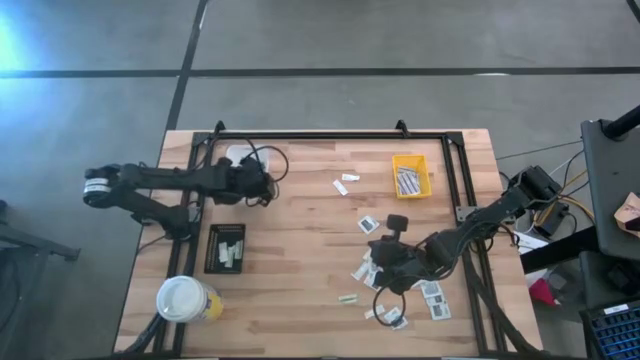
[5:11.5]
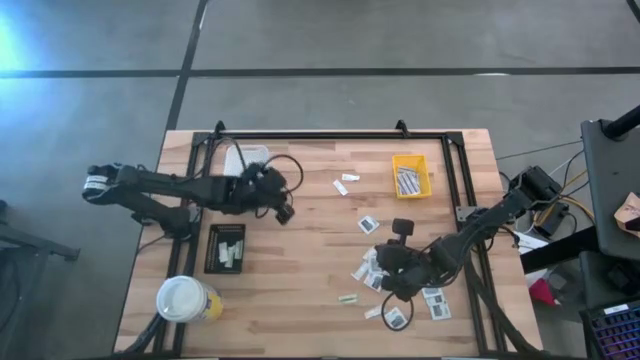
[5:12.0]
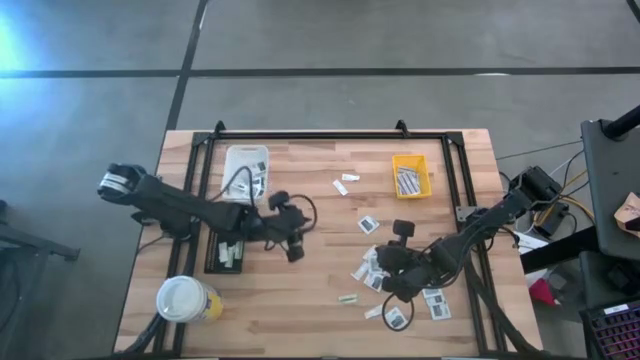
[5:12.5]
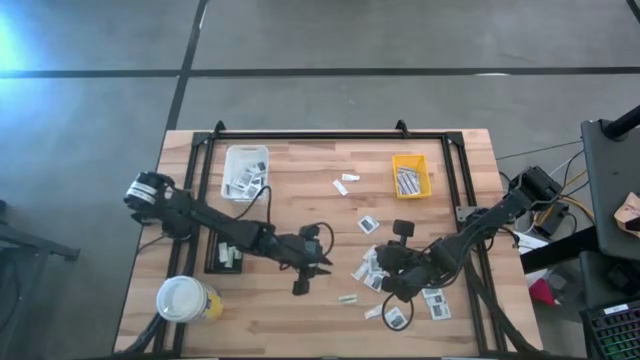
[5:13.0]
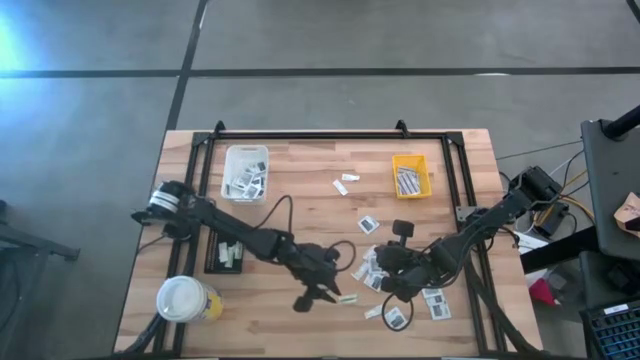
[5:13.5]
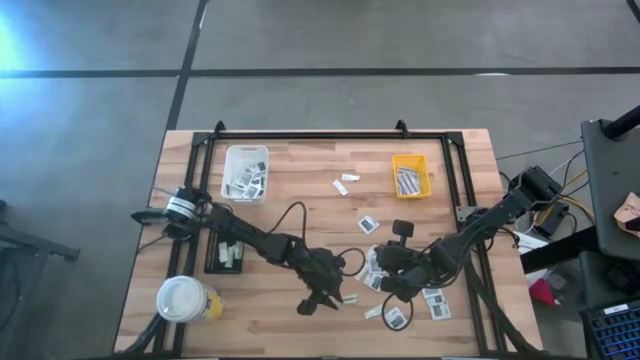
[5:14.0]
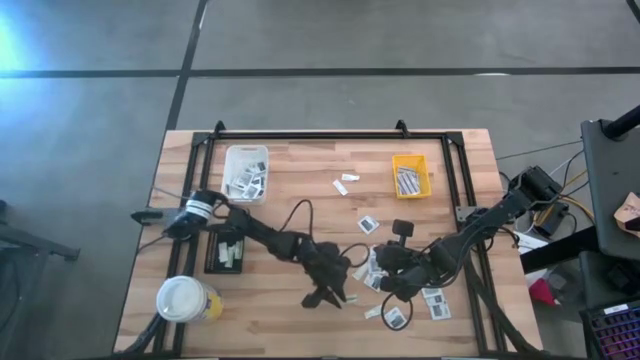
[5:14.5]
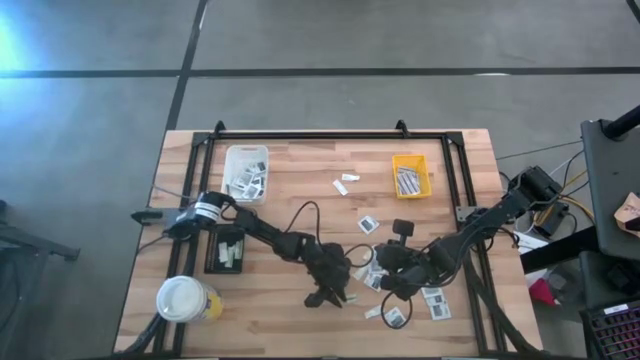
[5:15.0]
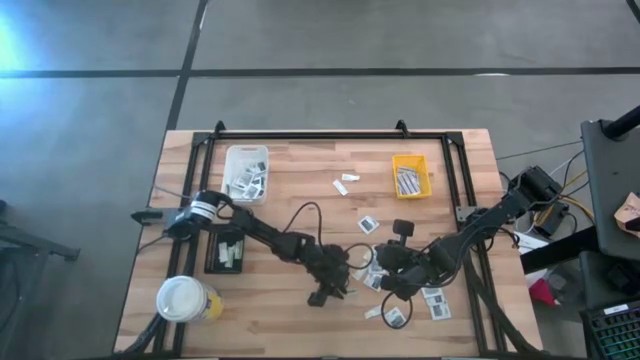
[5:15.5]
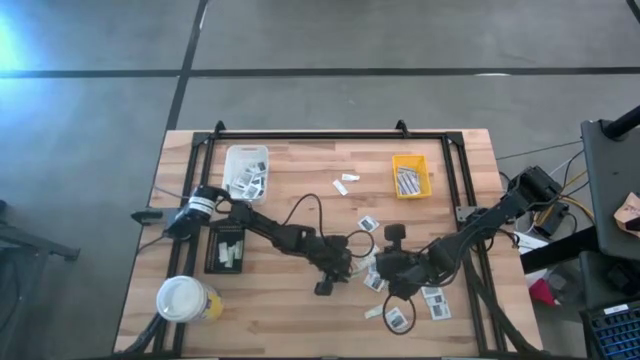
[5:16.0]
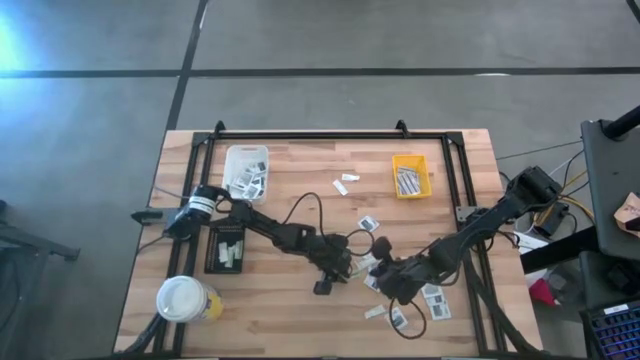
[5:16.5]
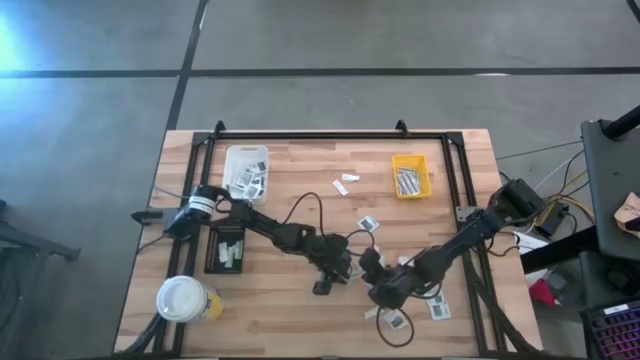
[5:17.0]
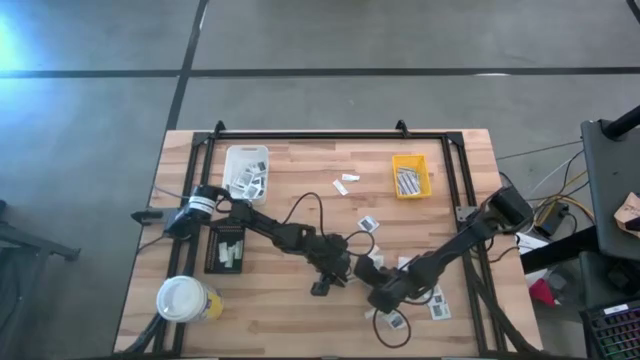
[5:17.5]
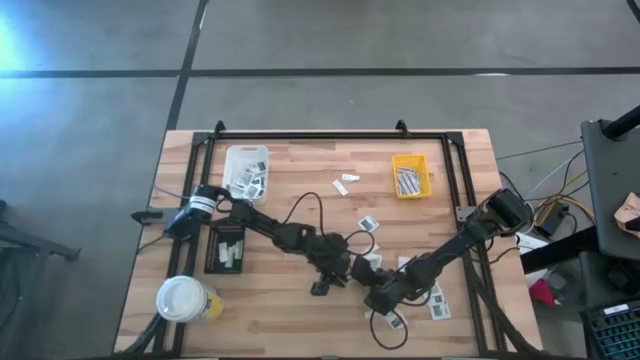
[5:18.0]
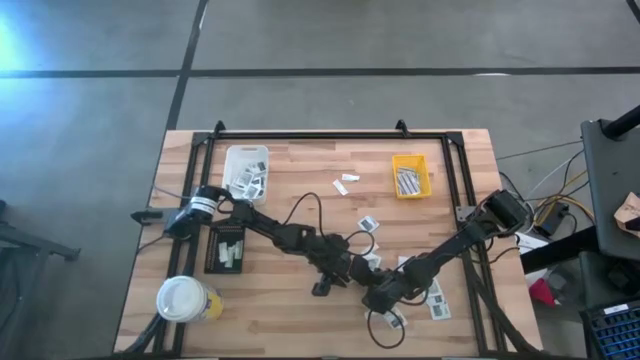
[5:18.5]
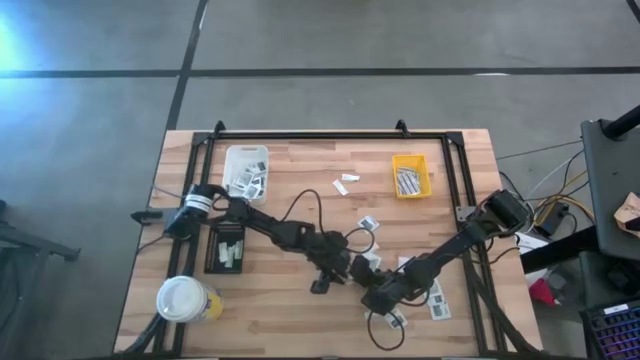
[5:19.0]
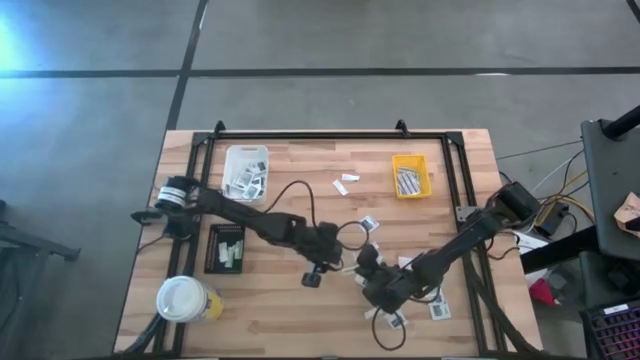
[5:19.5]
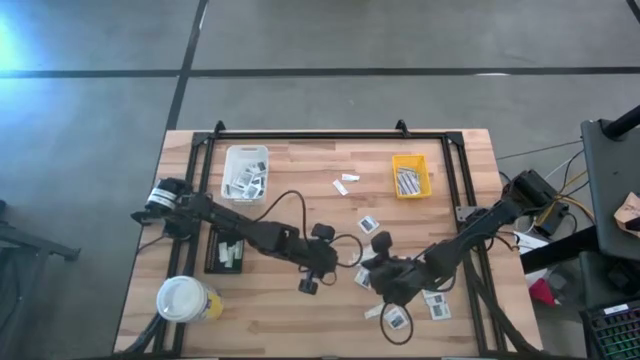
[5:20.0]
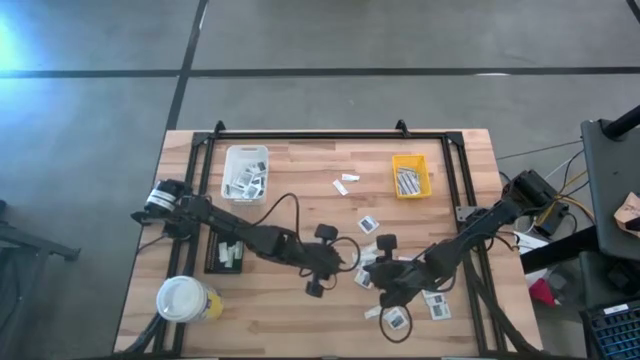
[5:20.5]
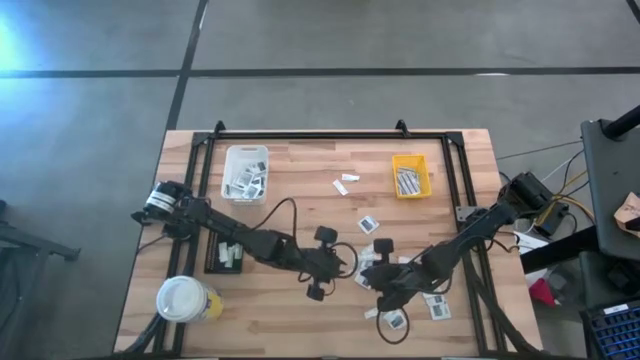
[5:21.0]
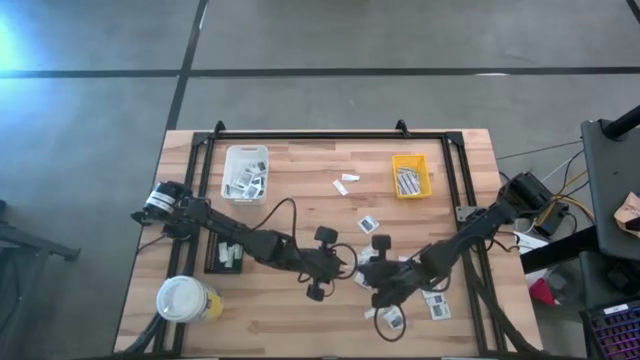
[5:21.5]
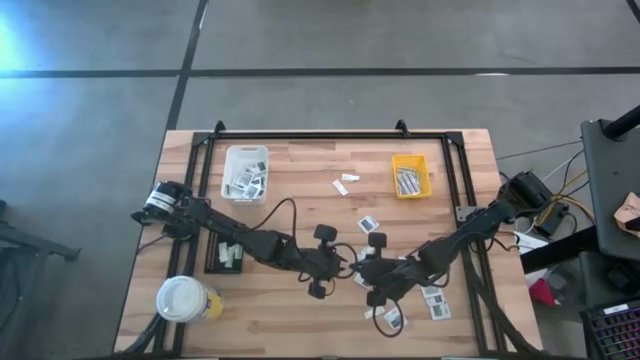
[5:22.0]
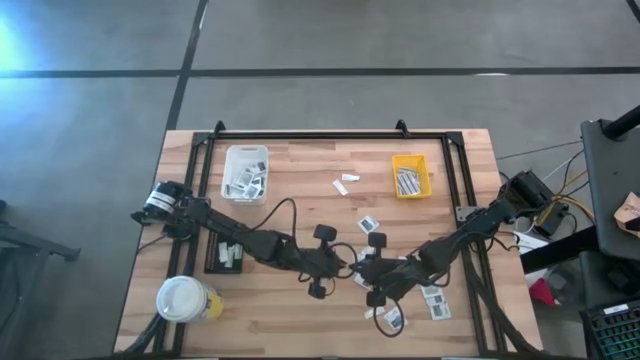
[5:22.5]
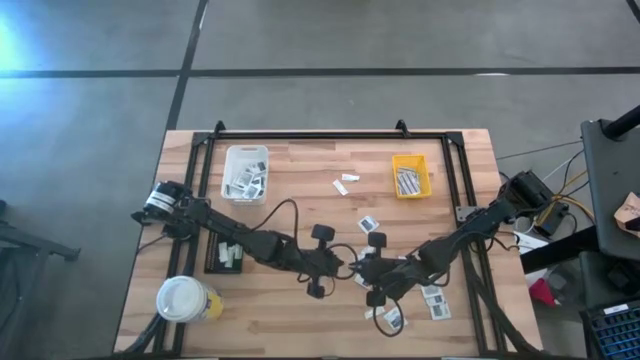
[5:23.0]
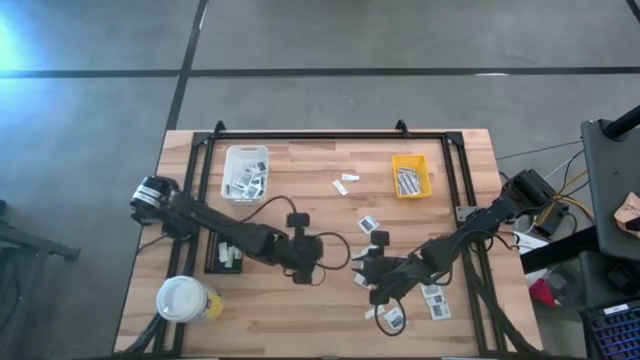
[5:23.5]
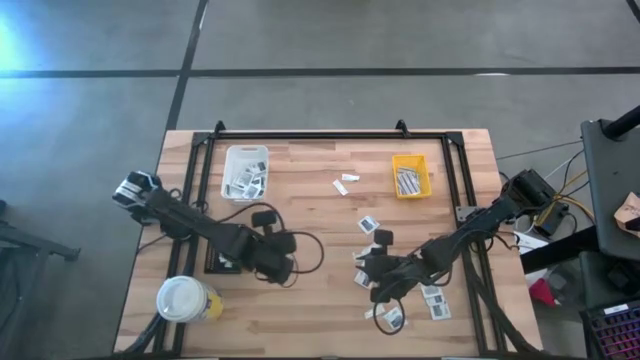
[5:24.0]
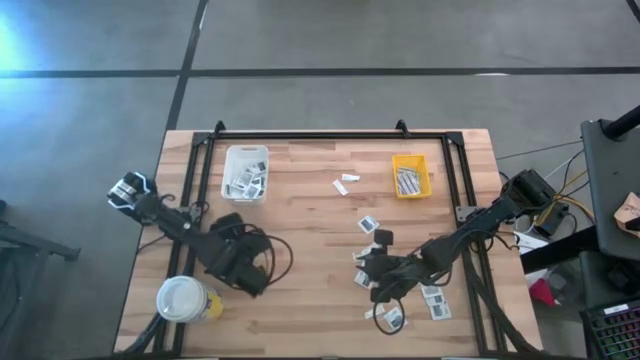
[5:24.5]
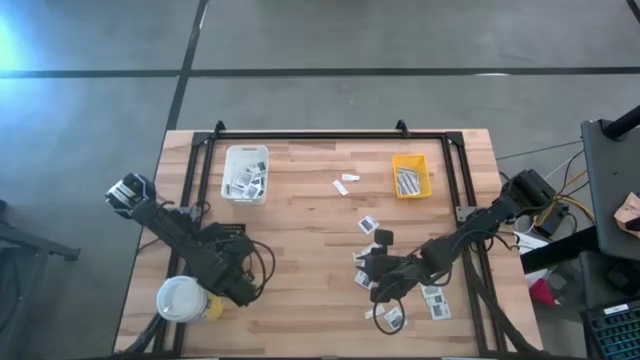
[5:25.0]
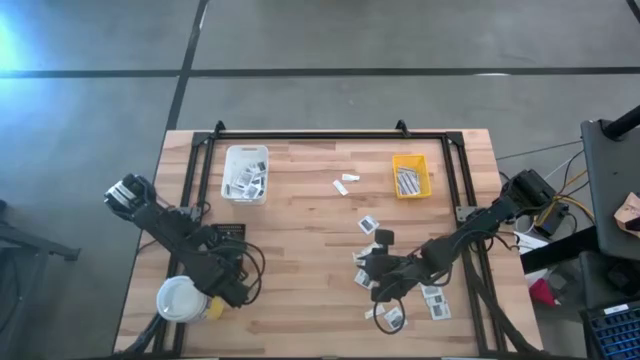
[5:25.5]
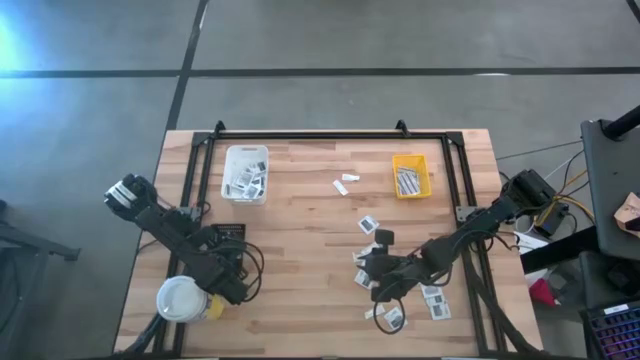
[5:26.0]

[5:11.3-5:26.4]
Task: Pick & Place First Aid Supplies
Put the green bandage pack into the black bin

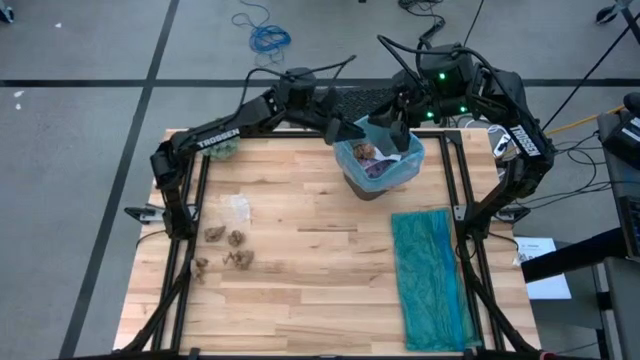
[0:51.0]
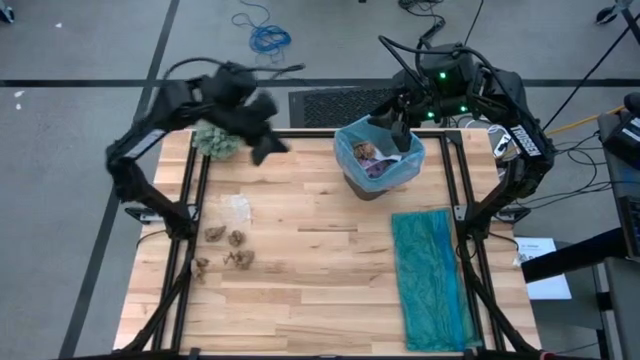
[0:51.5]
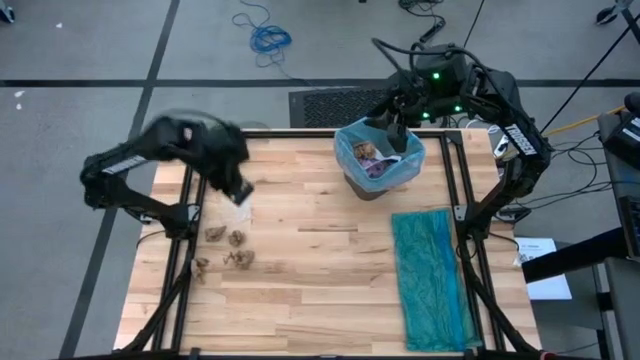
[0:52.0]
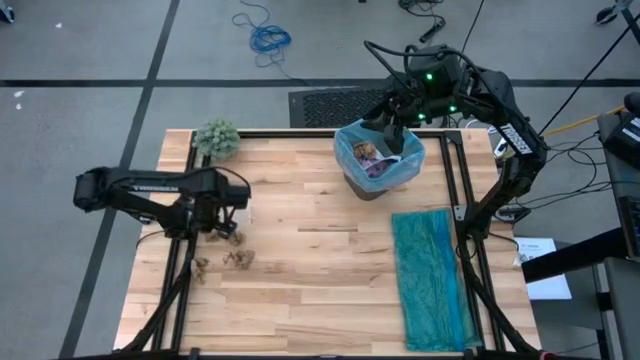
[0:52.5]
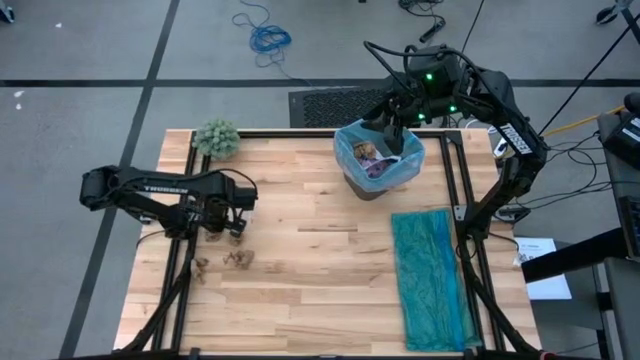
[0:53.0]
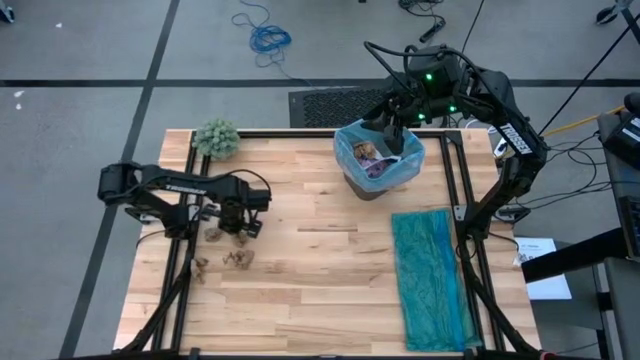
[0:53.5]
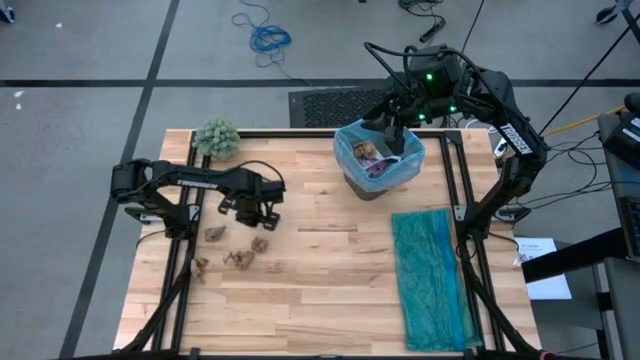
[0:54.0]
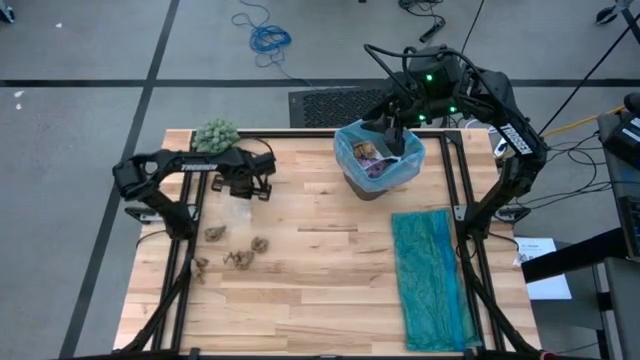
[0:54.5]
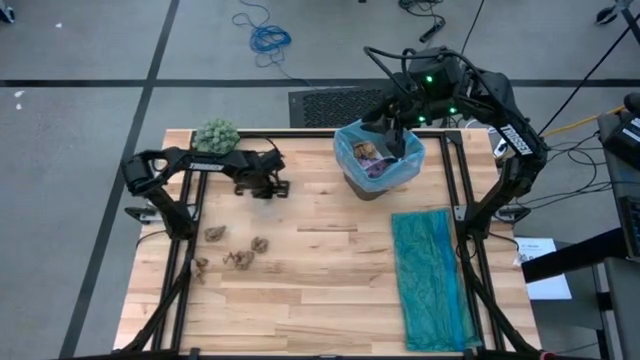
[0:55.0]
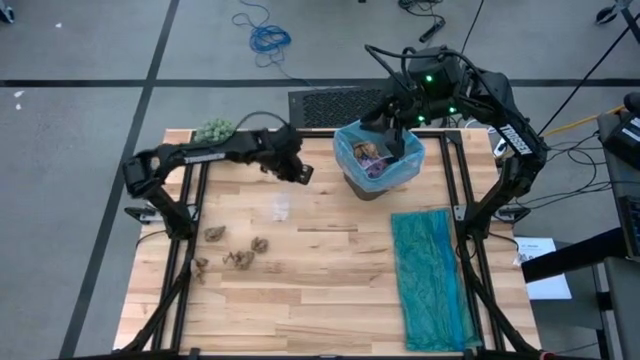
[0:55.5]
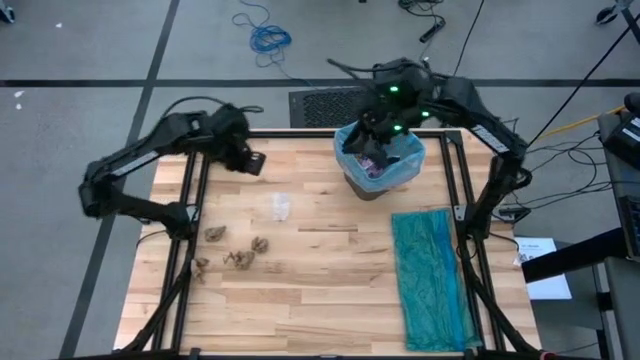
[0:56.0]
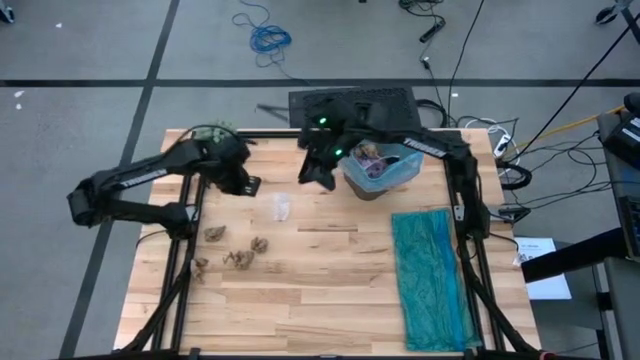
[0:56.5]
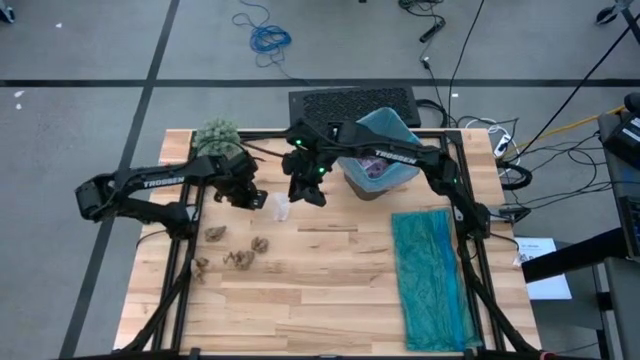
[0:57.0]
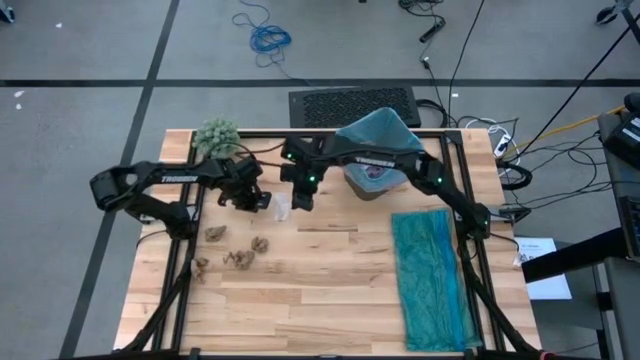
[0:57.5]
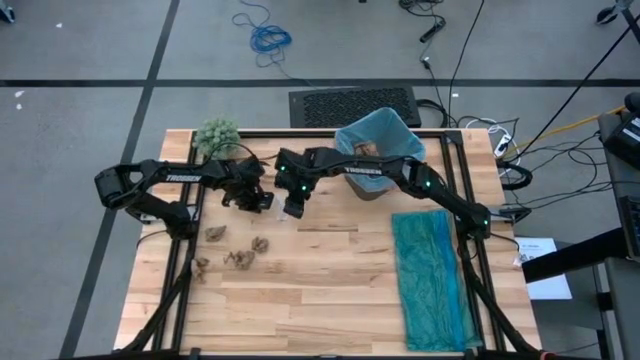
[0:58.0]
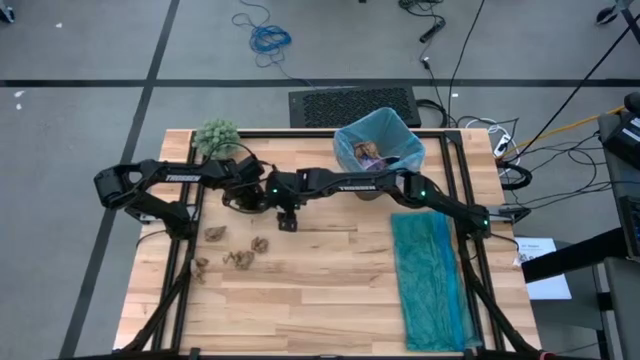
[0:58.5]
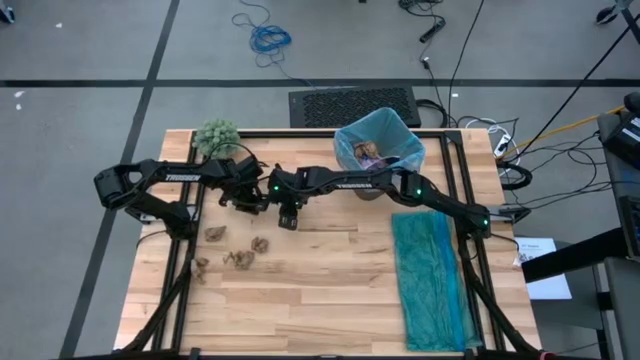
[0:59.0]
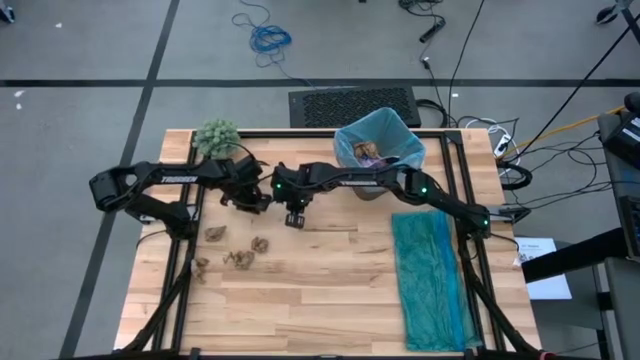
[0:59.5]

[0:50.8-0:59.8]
Task: place trash/remove bag and relplace
Put the transparent plastic into the trash bin
